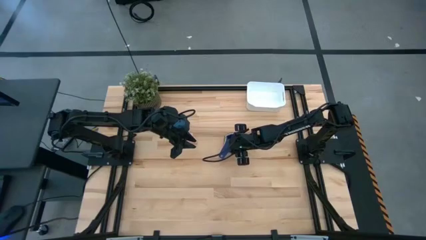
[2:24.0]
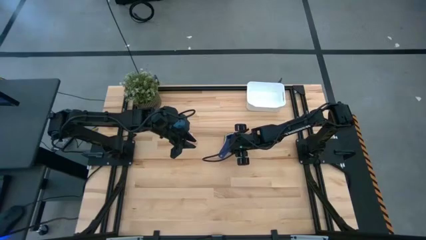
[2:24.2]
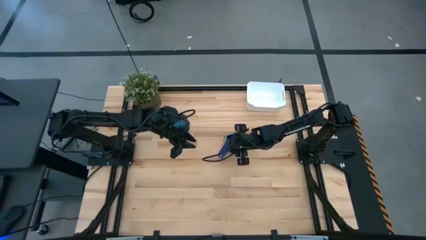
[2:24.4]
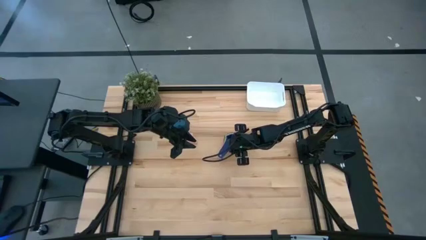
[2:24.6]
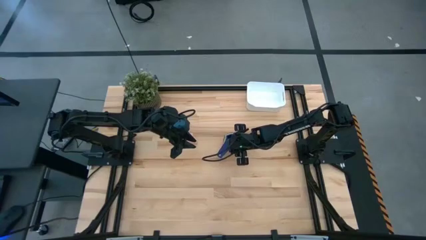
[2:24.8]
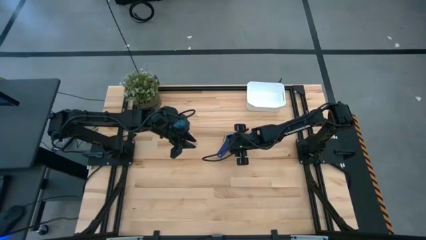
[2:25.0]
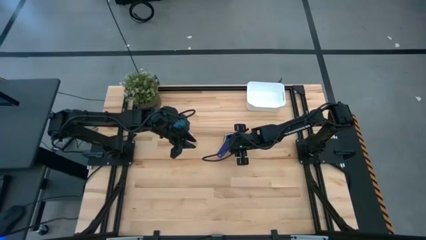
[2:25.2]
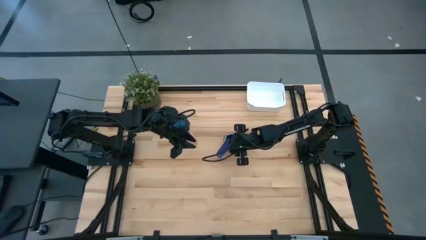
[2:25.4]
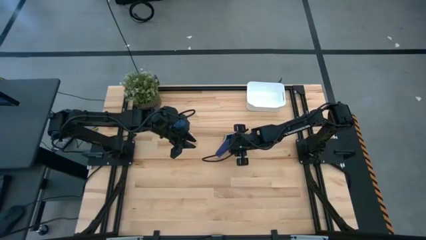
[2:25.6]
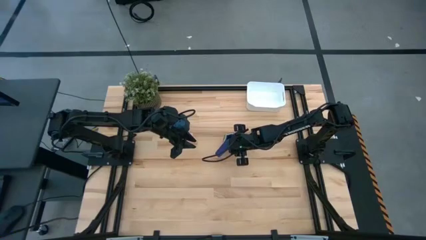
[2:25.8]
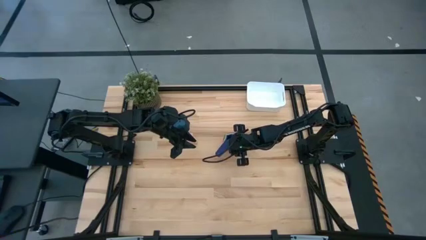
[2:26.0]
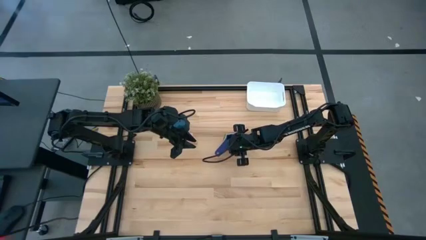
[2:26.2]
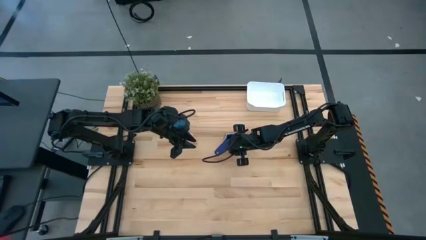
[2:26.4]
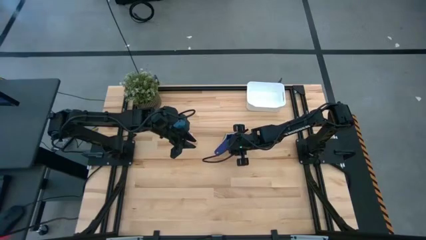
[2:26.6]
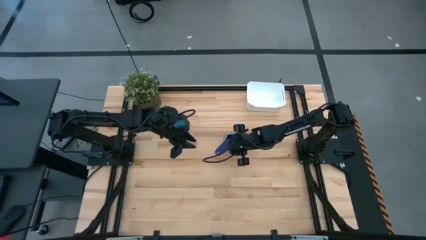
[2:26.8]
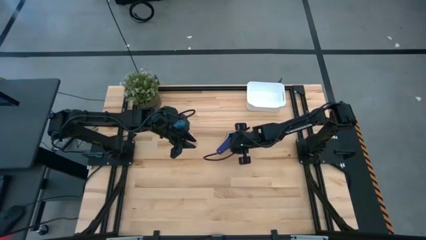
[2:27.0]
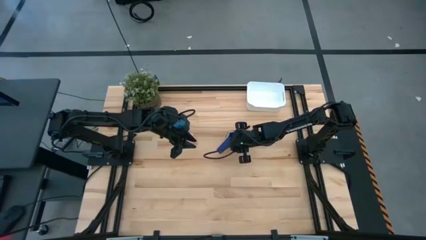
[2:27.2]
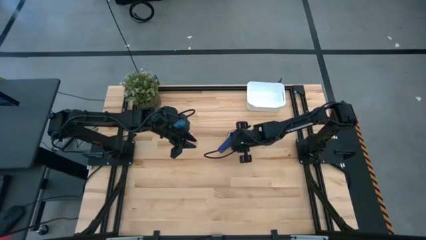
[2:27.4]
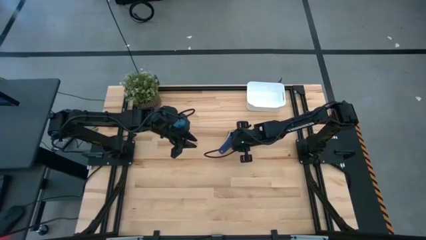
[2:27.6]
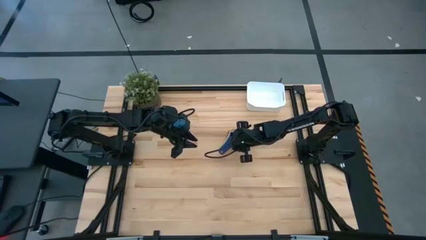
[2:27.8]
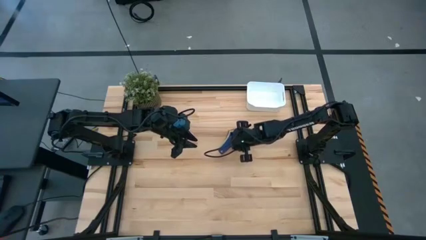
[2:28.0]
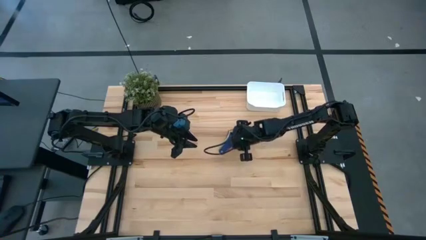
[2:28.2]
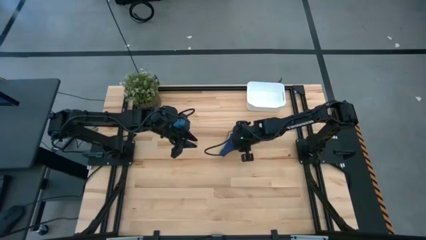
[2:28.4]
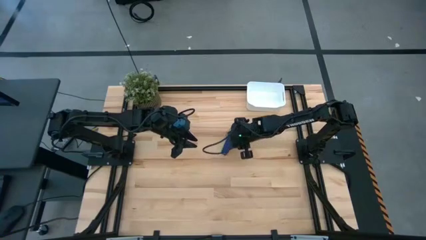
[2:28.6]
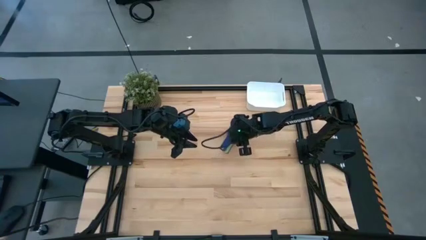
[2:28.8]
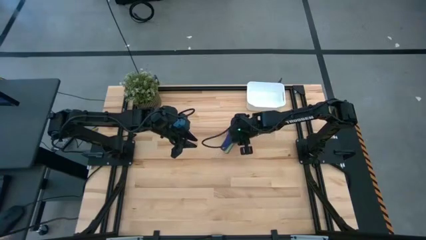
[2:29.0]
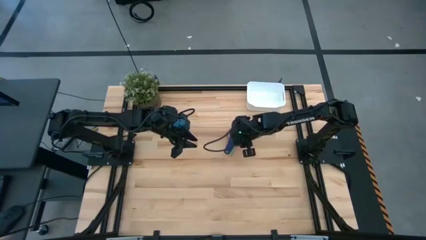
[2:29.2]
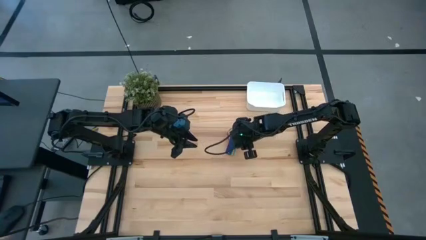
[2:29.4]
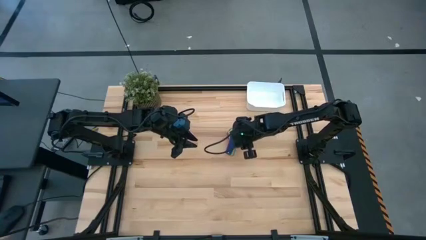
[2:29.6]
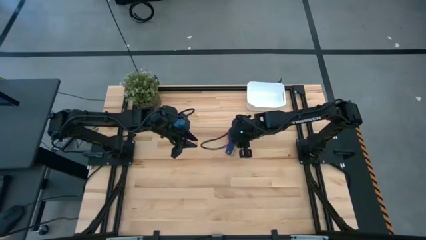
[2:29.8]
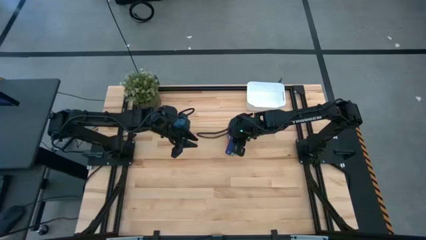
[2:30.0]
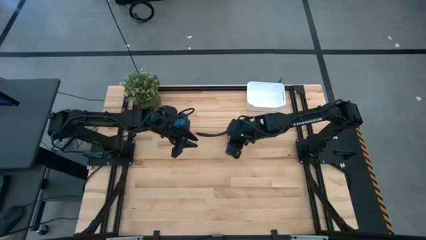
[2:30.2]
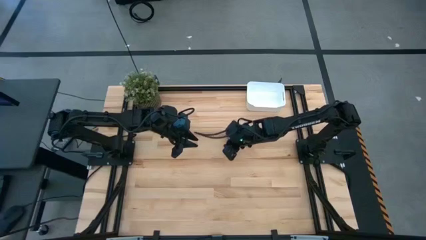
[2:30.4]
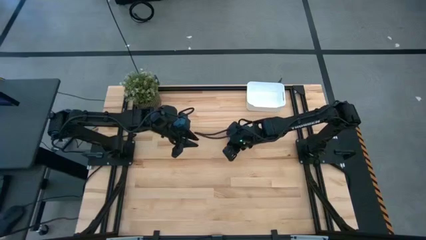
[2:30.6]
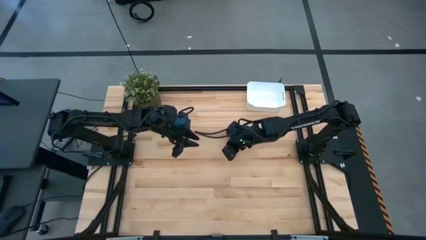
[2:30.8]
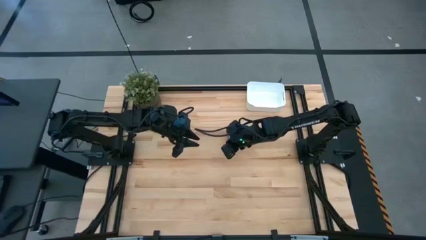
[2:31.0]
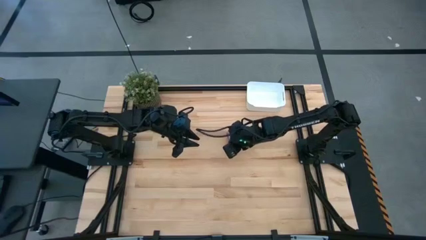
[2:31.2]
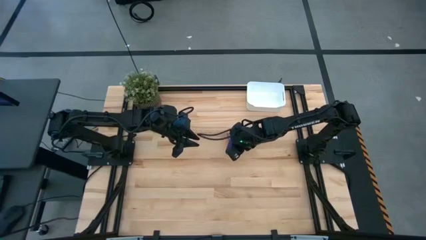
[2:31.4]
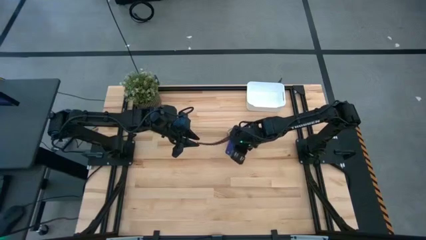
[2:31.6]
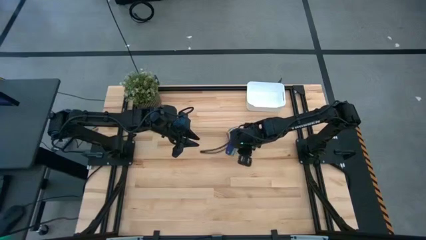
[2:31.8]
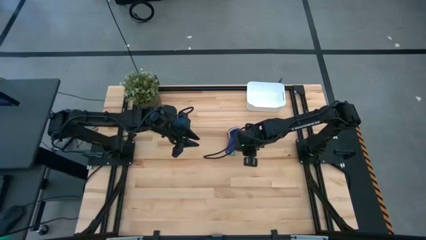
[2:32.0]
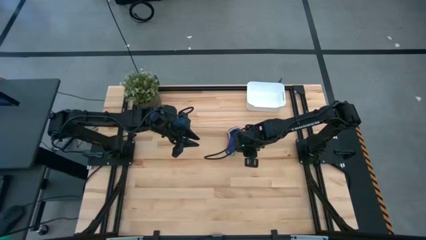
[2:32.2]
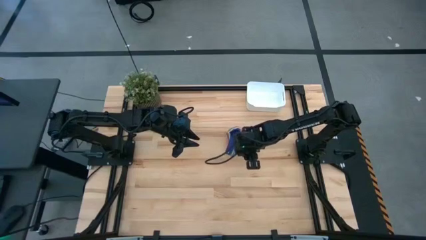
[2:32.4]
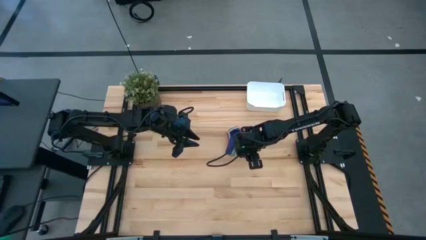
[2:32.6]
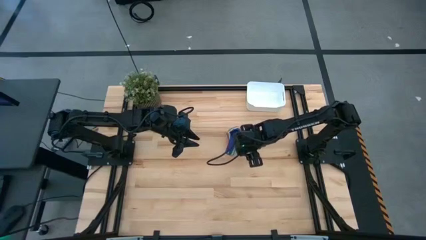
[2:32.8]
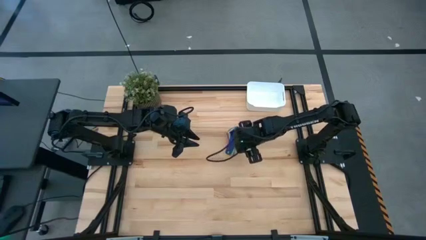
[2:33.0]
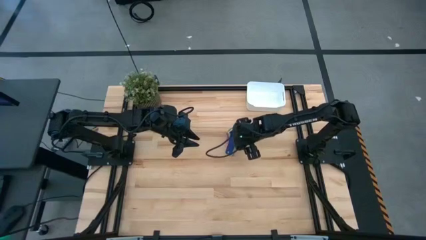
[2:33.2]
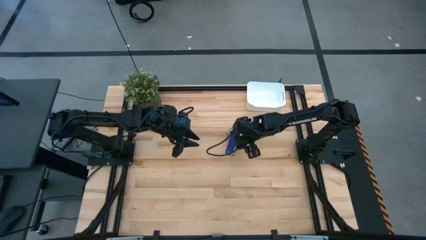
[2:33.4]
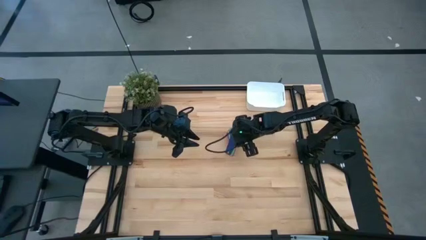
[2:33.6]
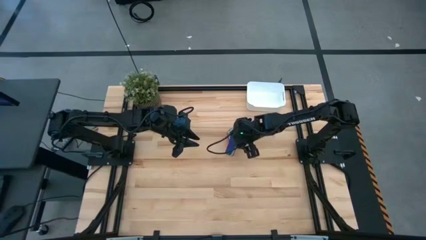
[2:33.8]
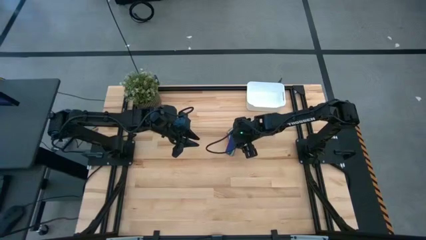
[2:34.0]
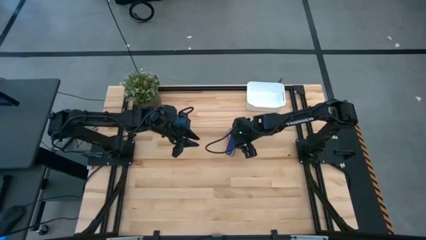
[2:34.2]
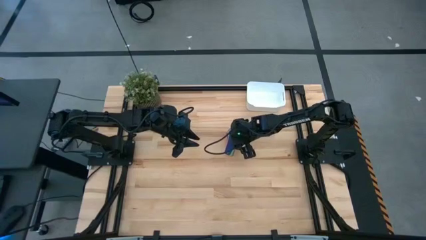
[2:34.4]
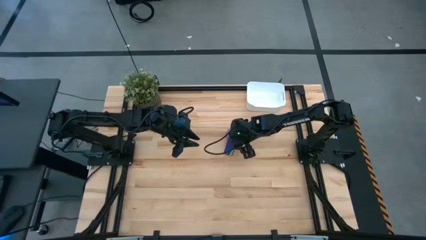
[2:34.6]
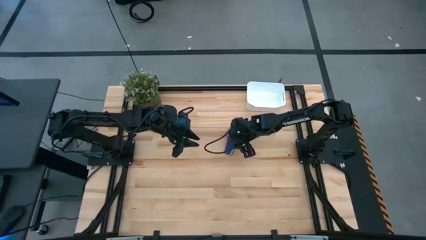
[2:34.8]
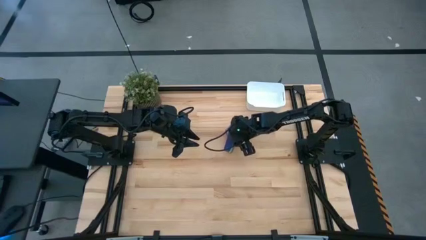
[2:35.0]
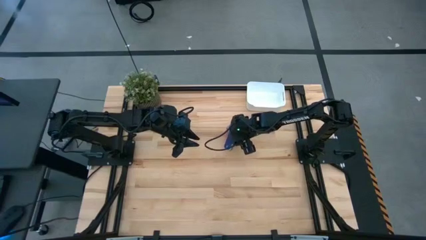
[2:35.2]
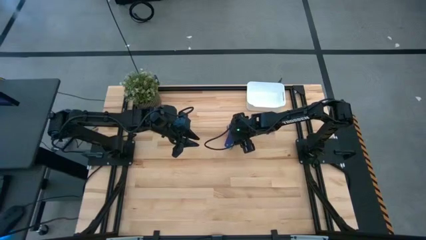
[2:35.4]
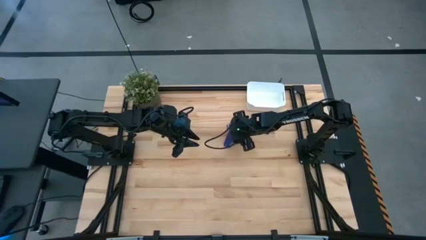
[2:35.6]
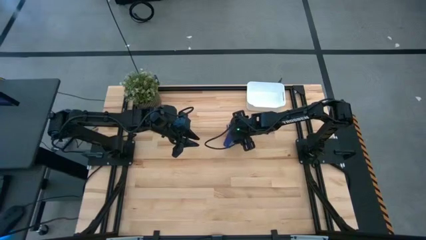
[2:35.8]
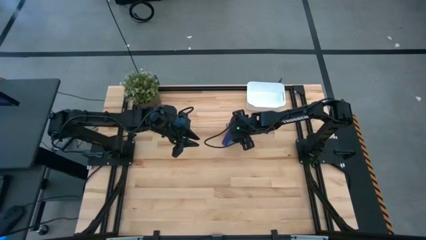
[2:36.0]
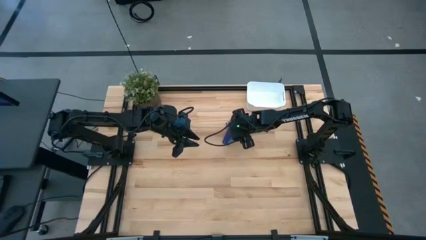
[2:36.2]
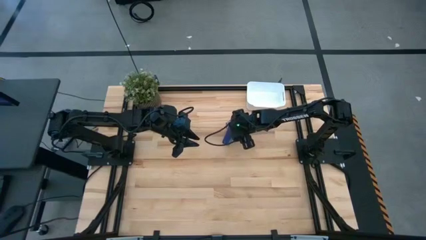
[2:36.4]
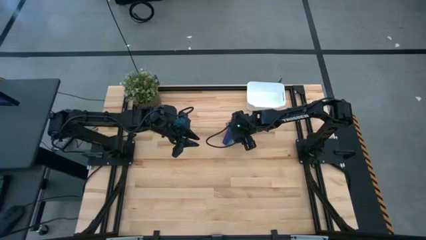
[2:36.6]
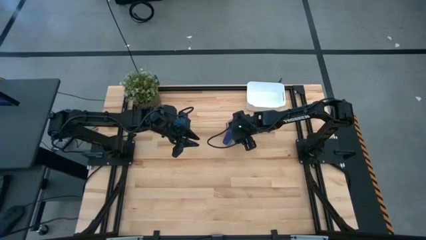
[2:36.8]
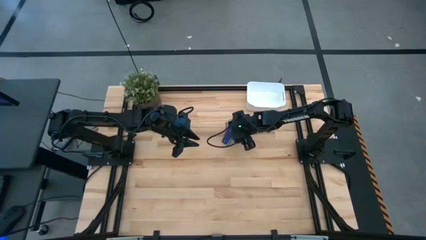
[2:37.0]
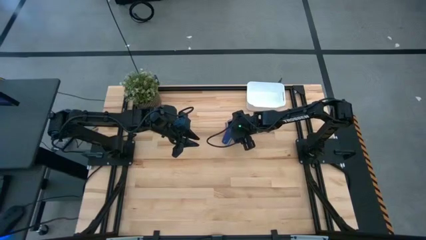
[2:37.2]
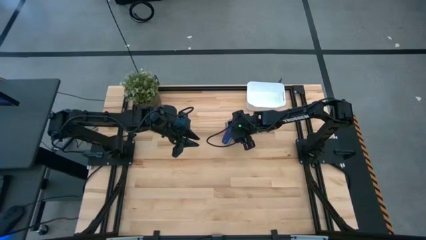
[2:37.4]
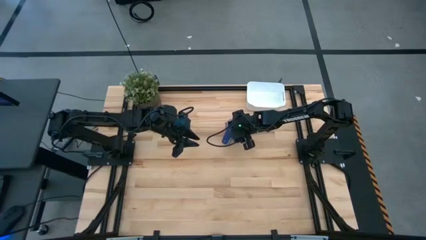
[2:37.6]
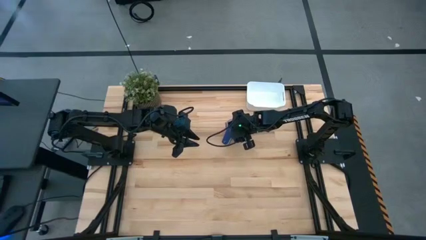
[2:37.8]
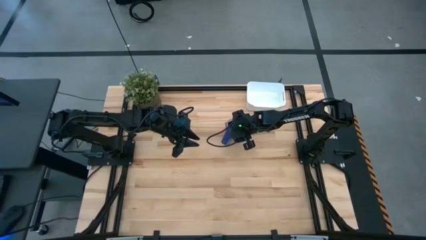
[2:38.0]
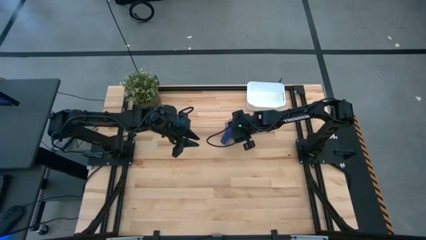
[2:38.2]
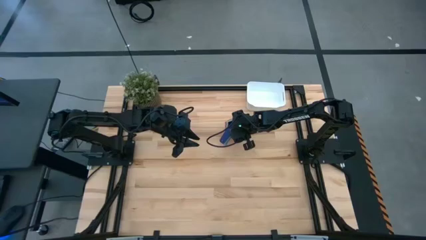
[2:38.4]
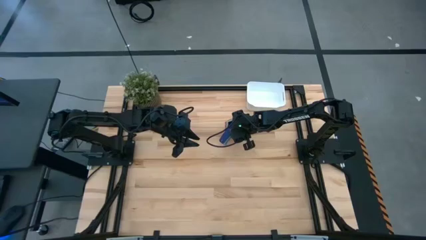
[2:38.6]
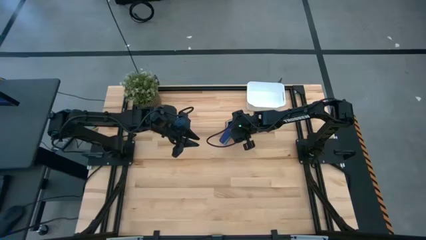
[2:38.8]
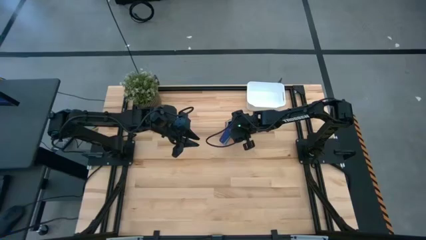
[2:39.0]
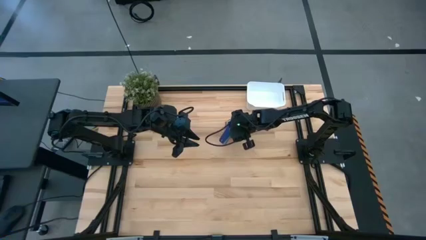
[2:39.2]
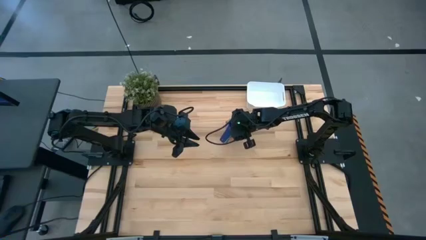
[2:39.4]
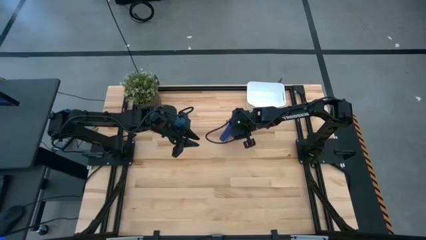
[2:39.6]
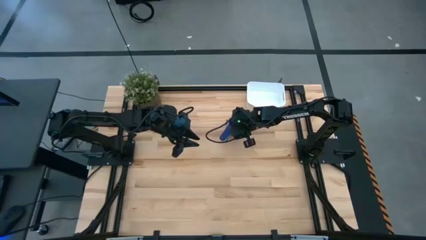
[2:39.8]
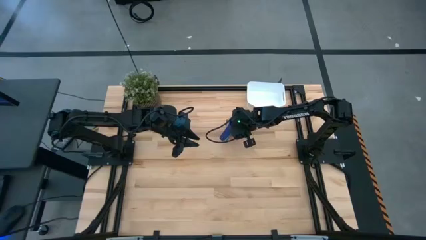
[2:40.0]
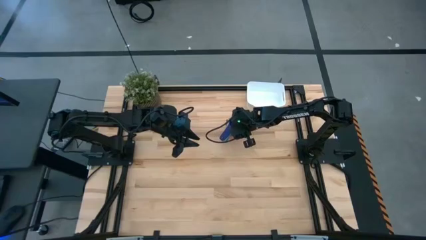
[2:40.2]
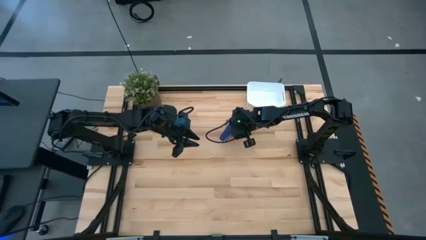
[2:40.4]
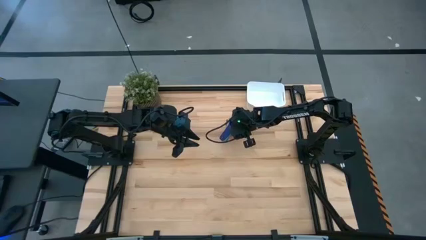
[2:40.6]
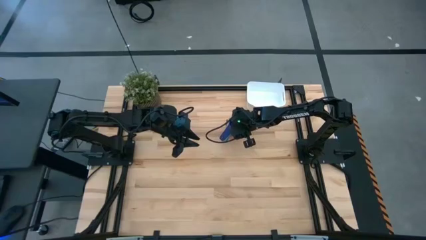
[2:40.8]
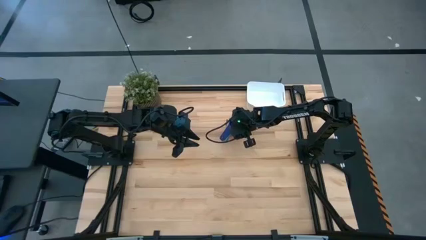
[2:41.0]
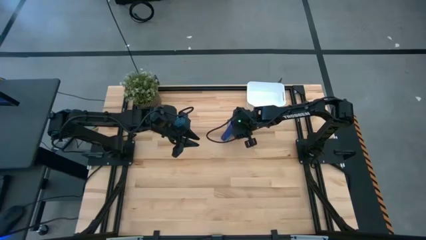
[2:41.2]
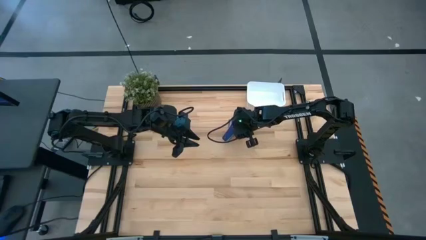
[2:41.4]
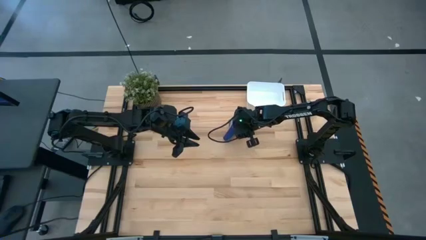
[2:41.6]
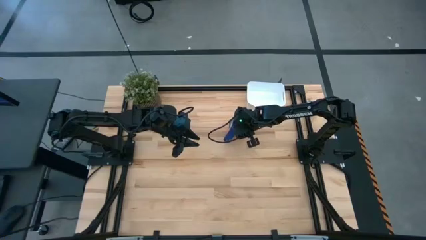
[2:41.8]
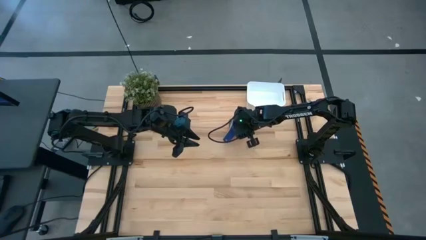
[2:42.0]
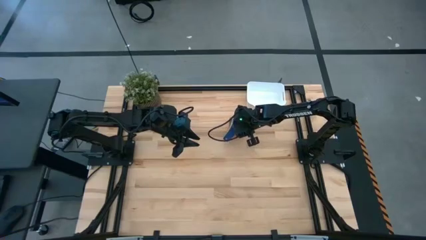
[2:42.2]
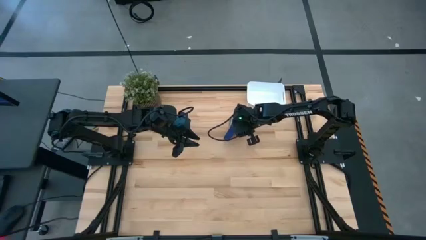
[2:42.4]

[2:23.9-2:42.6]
Task: Nest measuring cups in basket
Put the nested measuring cups into the white bin
